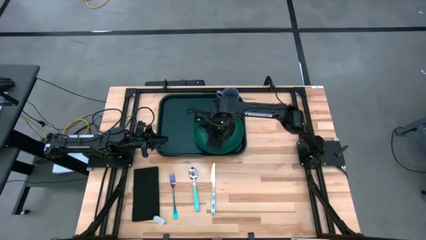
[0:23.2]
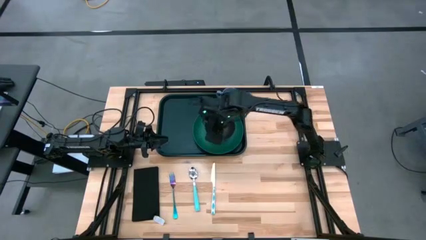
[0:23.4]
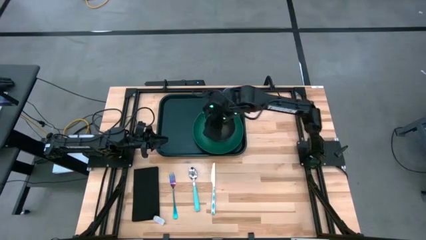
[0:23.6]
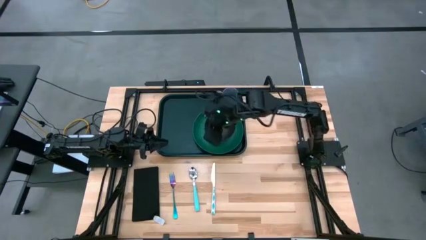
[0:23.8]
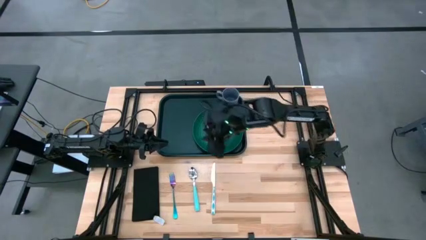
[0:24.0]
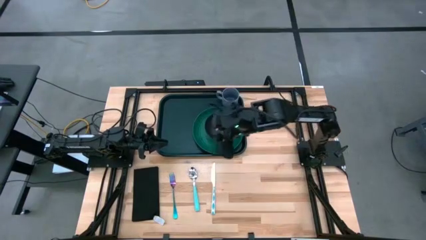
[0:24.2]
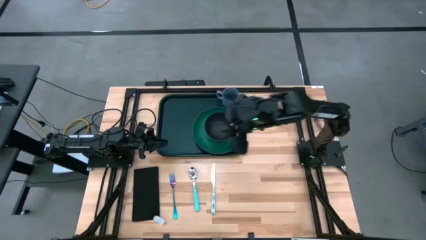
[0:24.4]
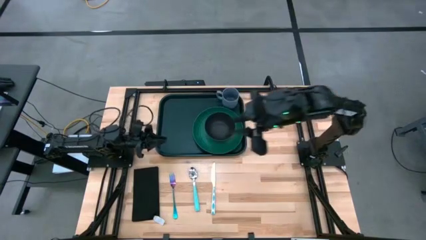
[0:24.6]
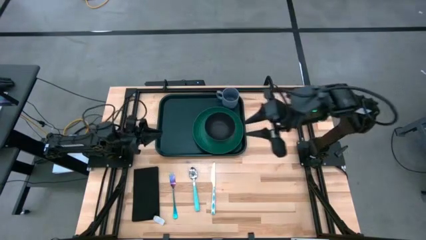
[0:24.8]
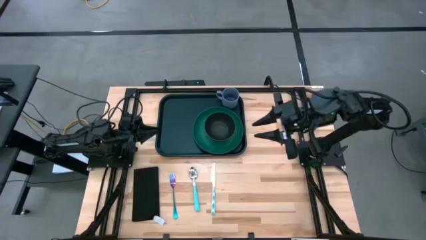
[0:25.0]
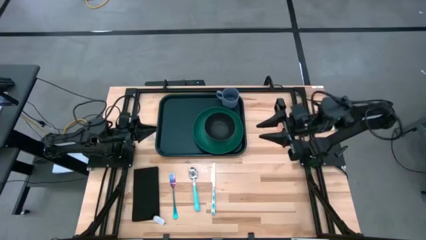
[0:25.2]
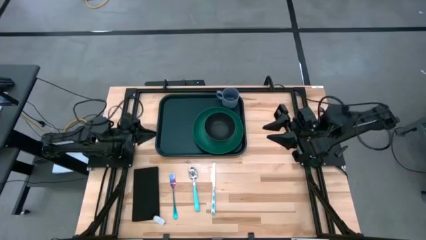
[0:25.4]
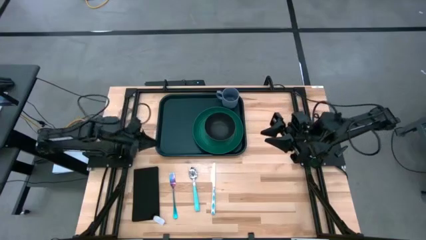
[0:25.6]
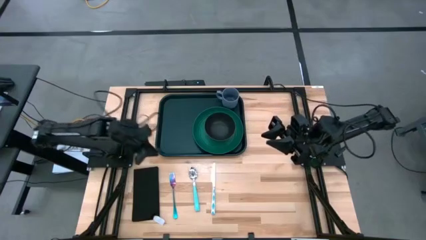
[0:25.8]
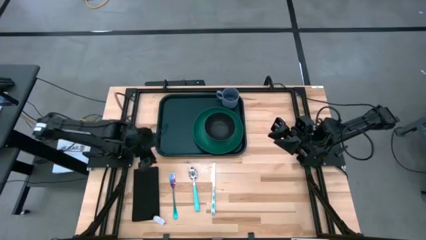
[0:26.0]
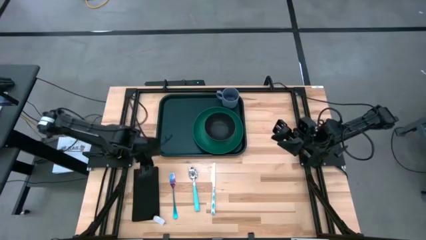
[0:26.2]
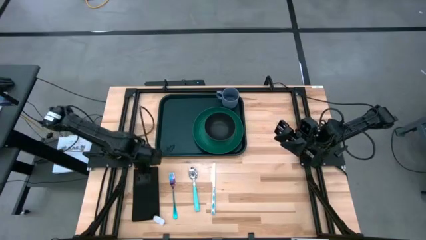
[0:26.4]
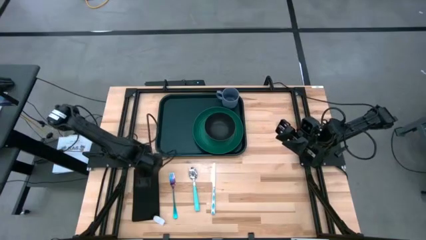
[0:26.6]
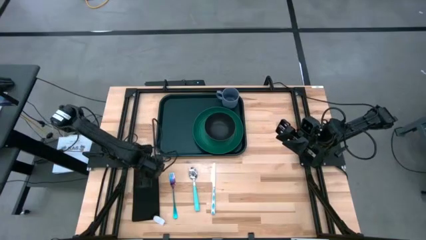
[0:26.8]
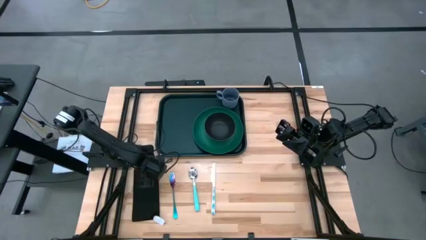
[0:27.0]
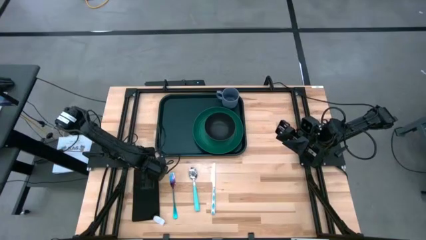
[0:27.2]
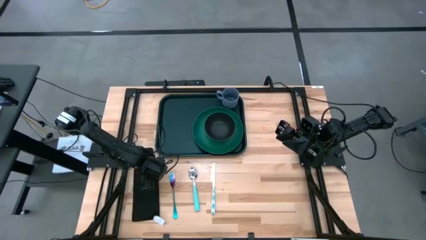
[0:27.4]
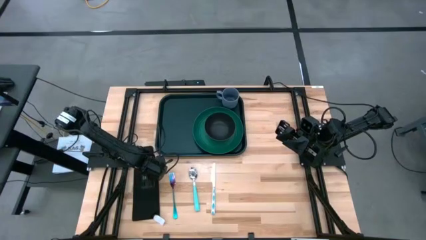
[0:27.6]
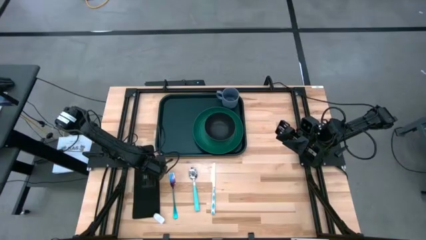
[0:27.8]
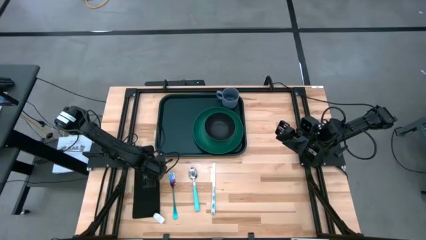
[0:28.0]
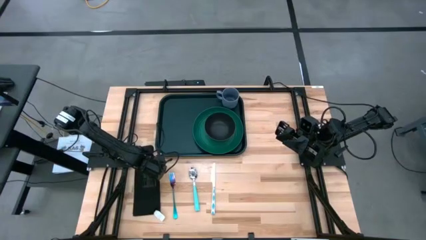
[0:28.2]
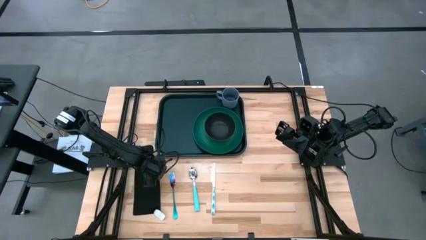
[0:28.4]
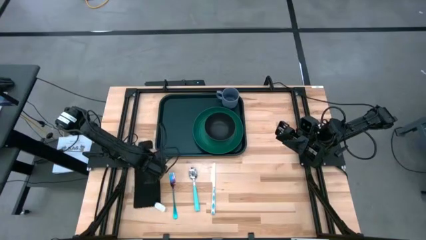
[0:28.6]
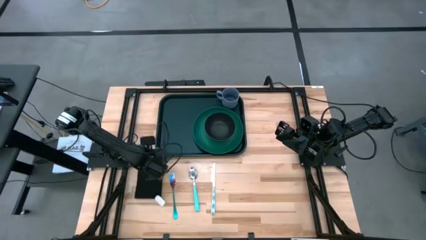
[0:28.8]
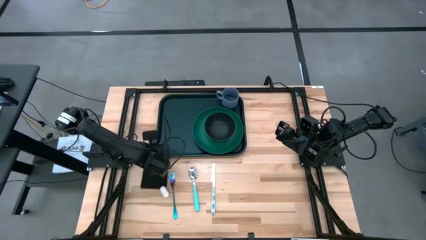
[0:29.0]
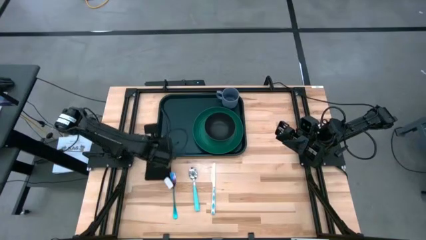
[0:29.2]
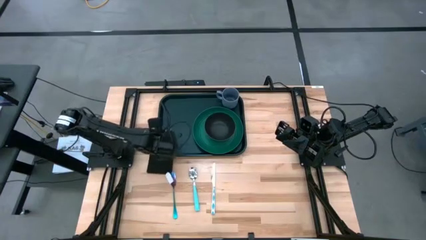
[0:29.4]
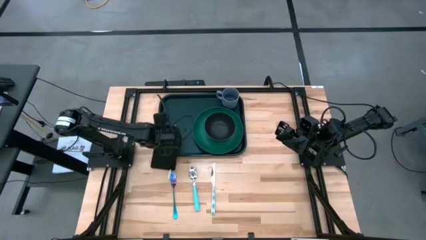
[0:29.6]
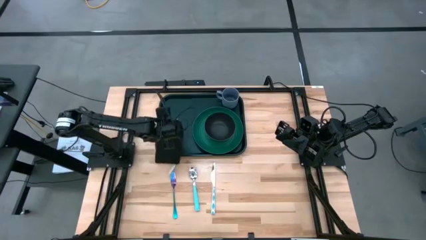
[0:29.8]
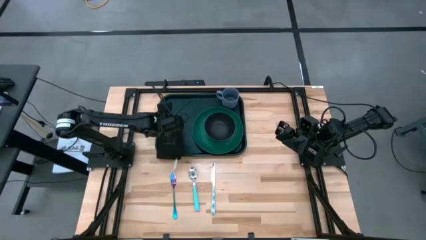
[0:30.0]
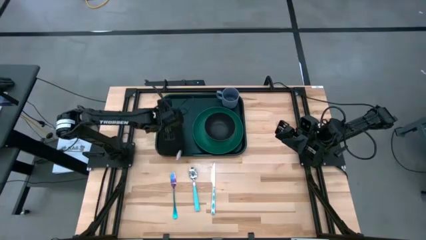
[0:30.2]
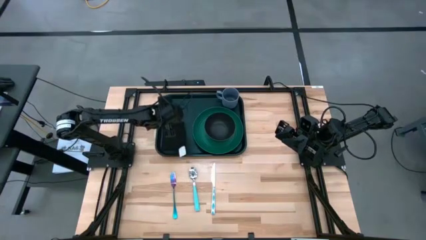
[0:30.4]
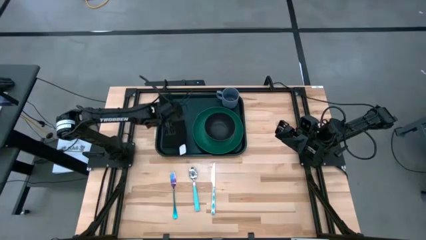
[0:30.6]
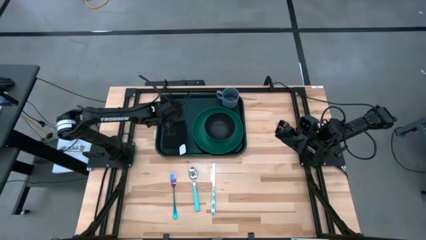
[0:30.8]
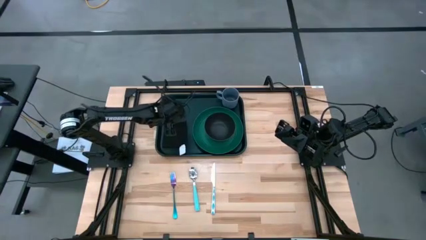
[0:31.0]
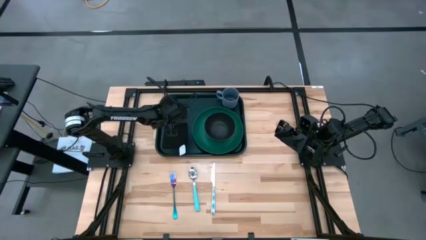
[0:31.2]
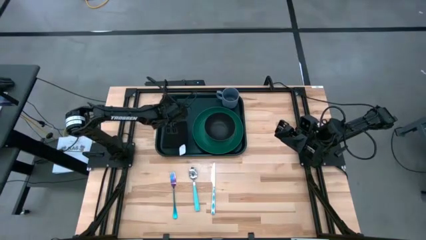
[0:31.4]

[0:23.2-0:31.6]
Task: Set up tray
Put the black napkin to the left of the green plate on the dark green serving tray

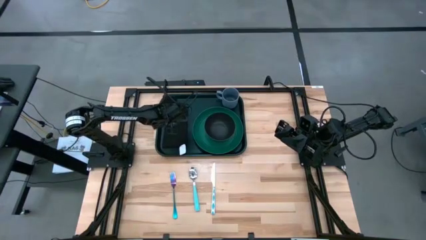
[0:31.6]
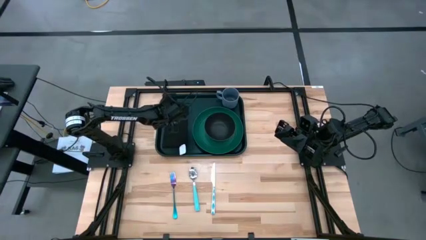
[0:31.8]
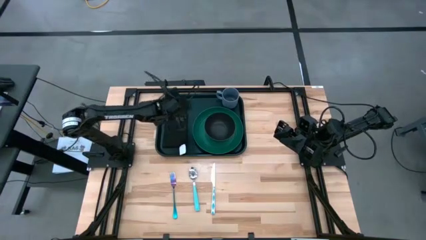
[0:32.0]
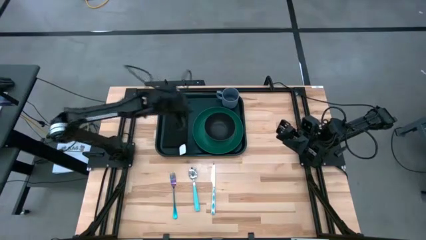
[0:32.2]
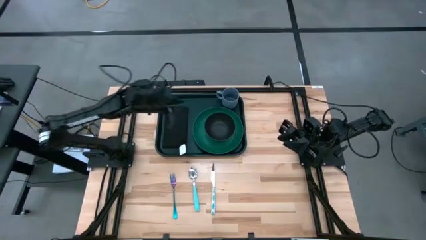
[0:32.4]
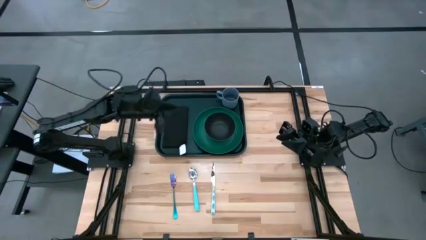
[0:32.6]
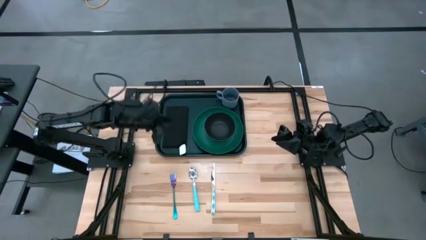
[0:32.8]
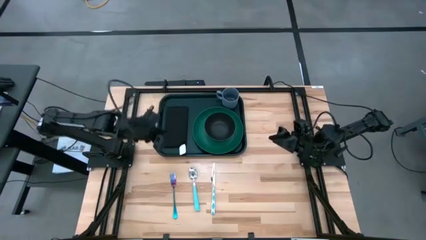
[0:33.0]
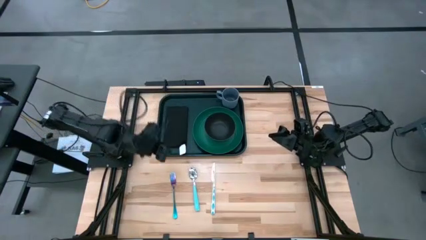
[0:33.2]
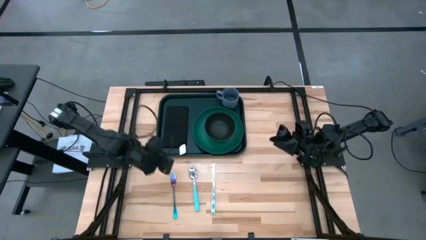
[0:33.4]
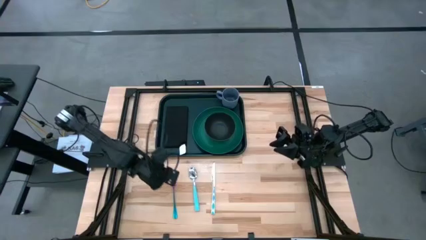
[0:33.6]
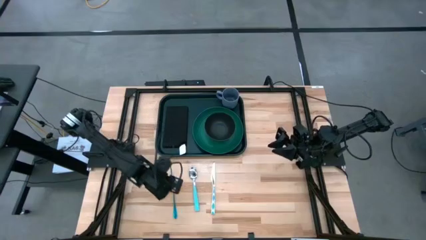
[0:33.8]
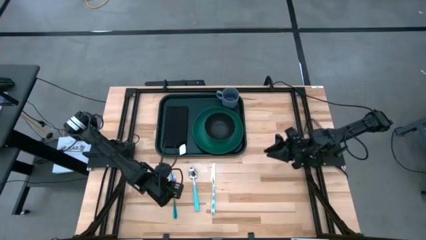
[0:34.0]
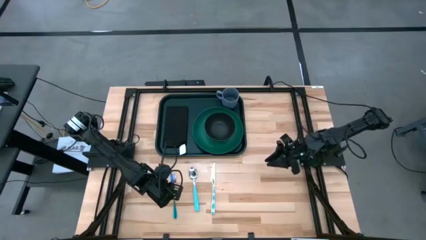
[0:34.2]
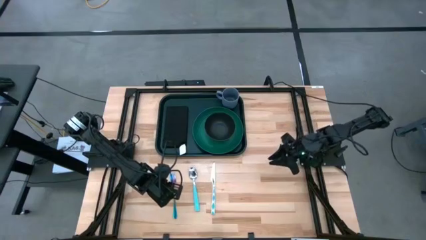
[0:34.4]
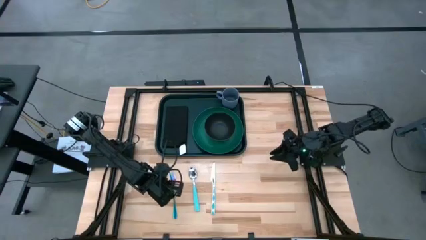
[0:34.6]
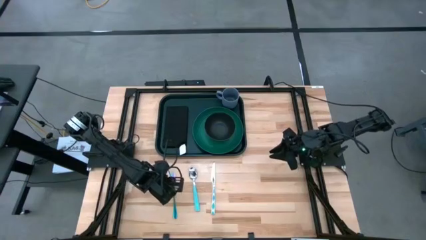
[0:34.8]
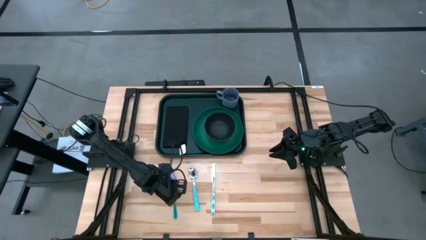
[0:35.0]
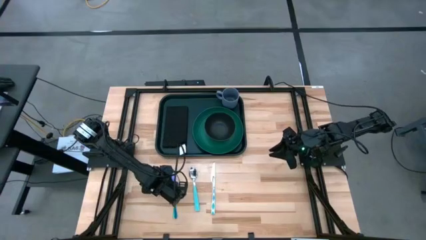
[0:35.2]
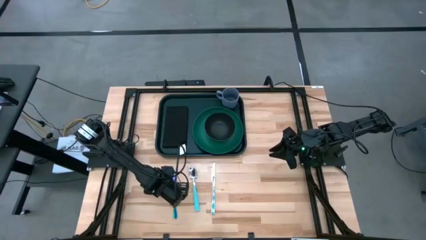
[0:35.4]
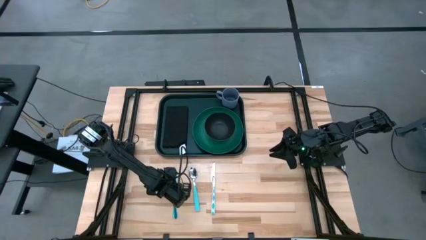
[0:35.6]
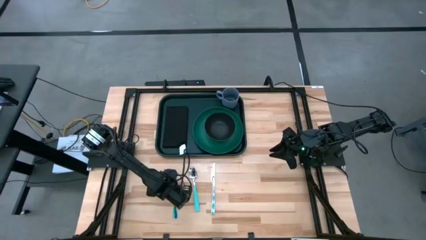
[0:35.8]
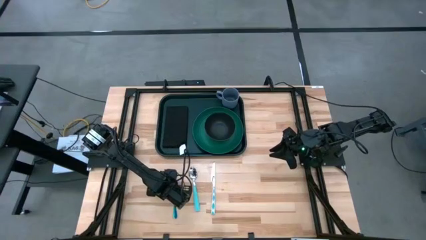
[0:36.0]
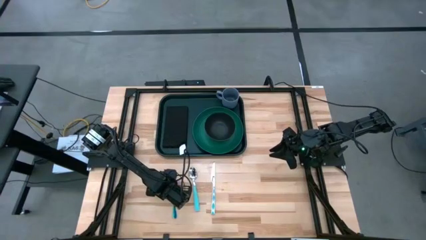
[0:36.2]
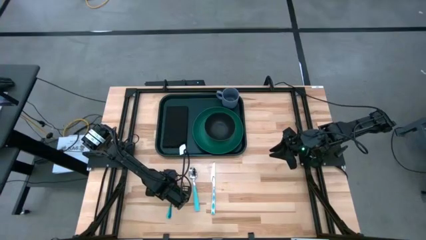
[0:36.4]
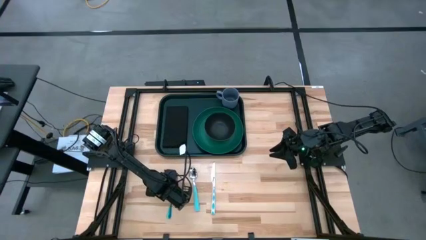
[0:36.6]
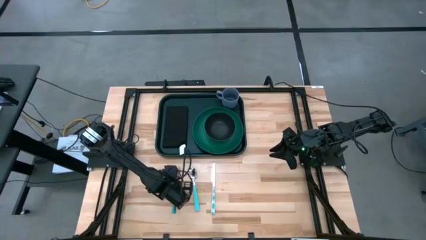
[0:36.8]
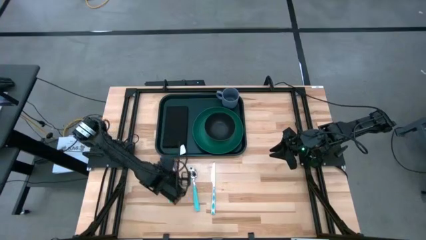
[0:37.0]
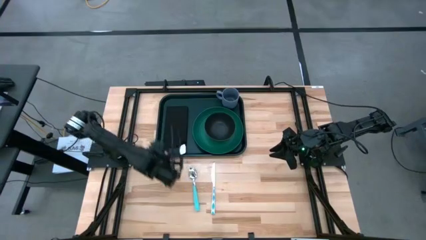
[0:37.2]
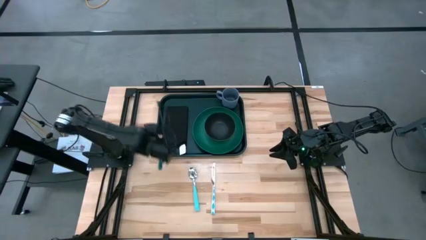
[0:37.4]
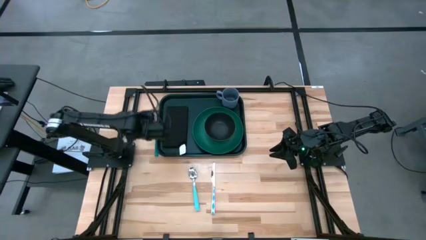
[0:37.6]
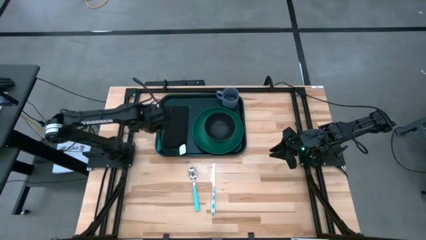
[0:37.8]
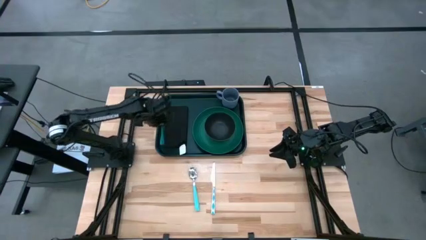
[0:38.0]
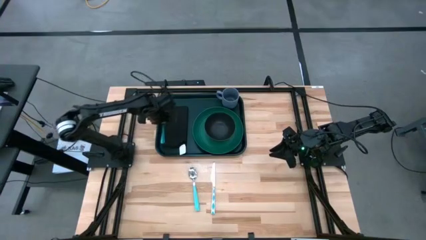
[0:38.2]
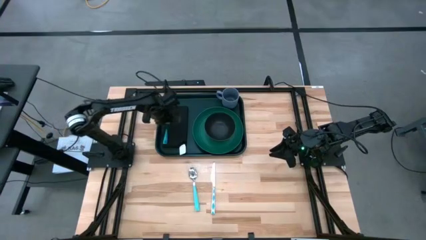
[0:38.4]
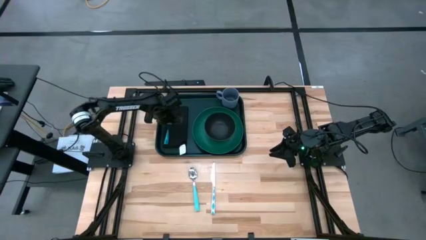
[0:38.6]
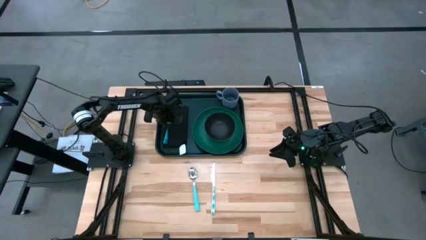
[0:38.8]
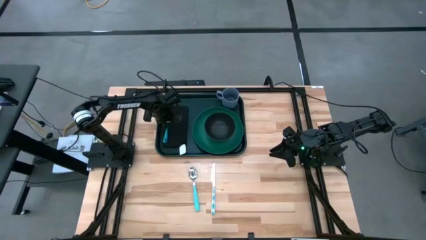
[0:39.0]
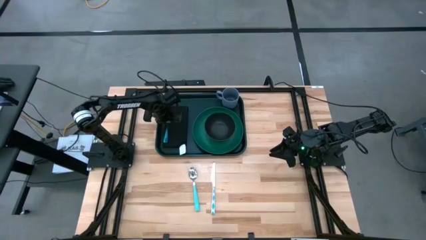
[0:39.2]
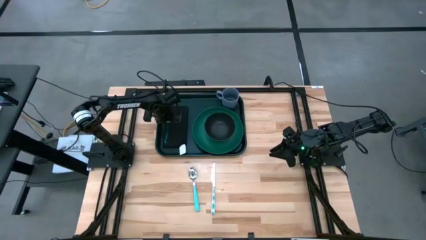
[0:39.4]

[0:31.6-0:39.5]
Put the blue fork on the black napkin on the dark green serving tray
